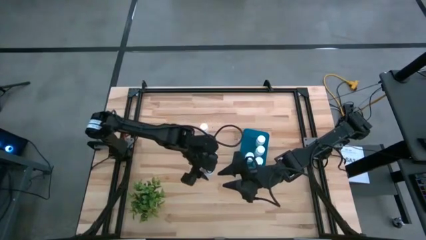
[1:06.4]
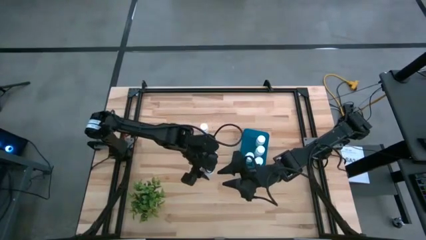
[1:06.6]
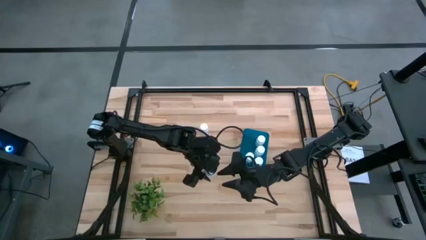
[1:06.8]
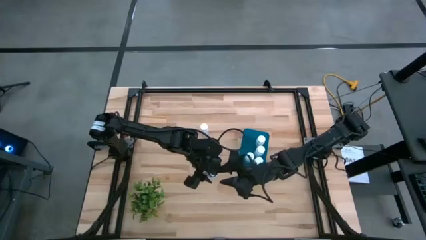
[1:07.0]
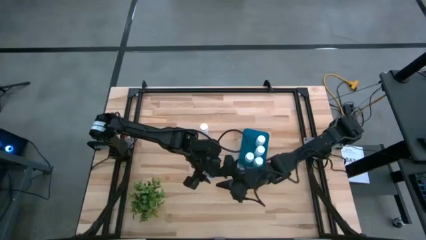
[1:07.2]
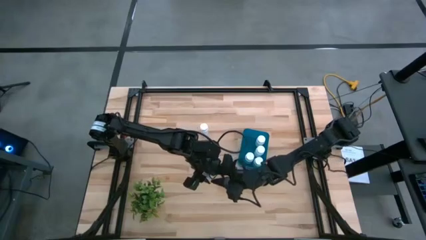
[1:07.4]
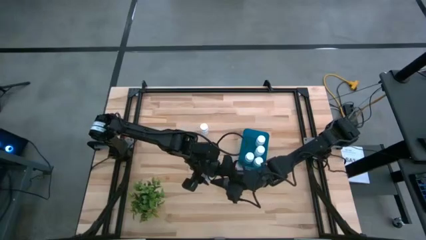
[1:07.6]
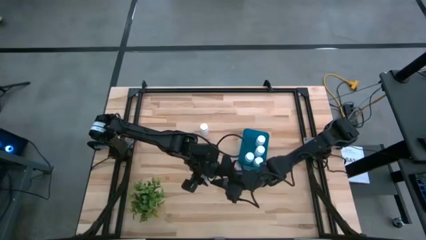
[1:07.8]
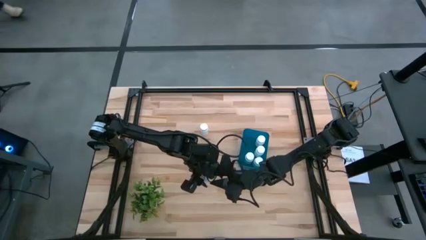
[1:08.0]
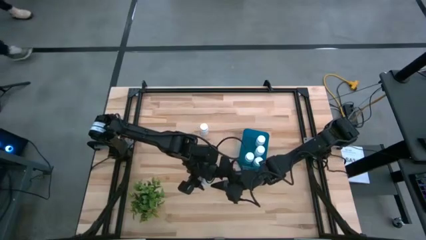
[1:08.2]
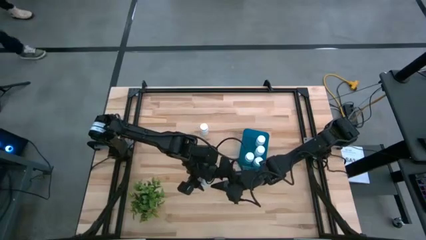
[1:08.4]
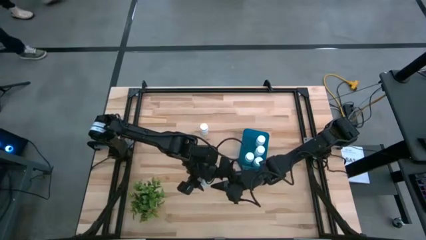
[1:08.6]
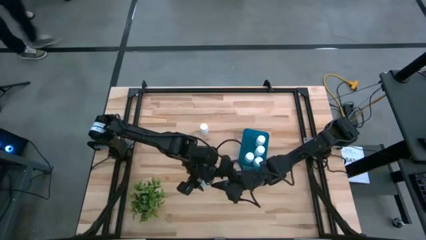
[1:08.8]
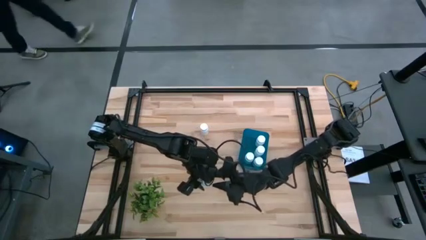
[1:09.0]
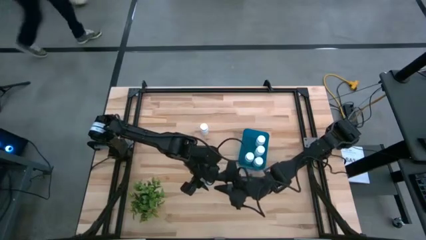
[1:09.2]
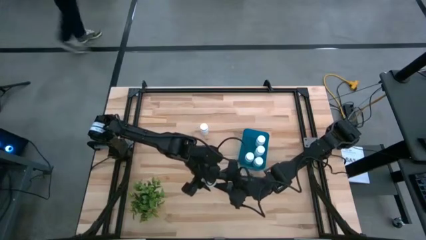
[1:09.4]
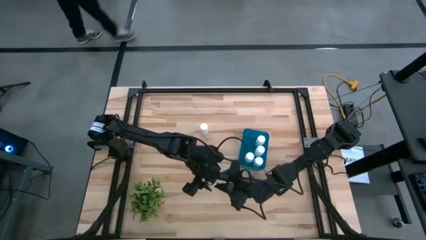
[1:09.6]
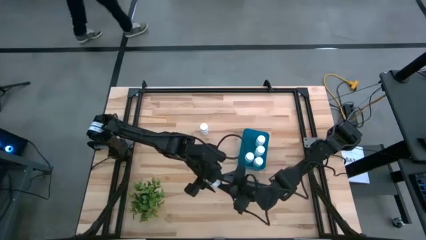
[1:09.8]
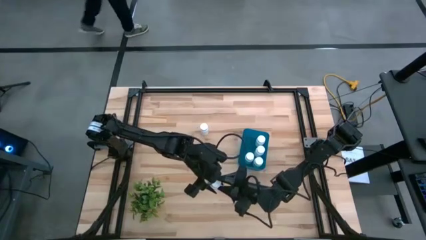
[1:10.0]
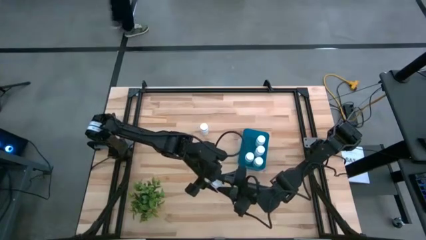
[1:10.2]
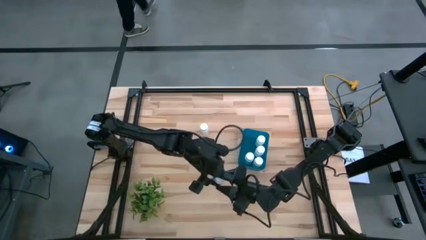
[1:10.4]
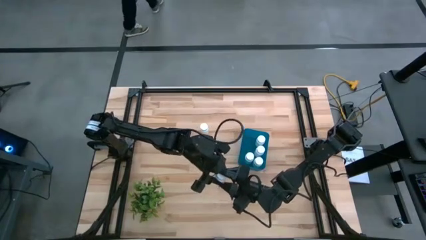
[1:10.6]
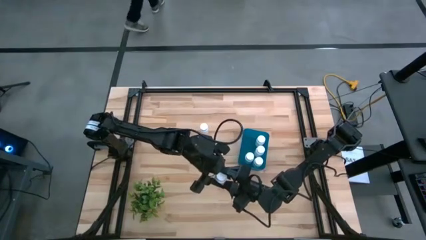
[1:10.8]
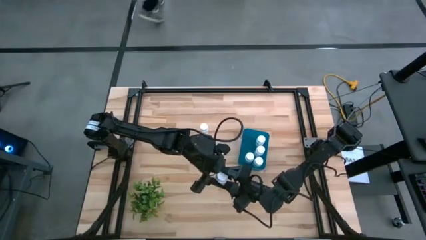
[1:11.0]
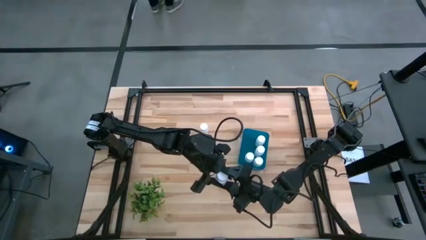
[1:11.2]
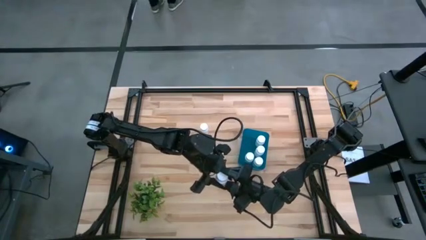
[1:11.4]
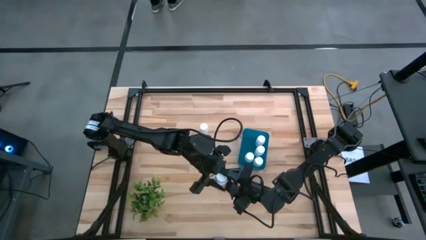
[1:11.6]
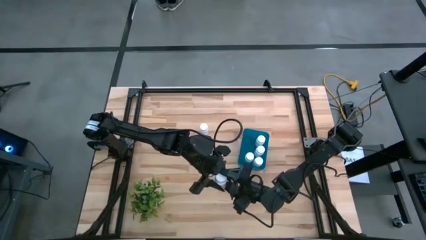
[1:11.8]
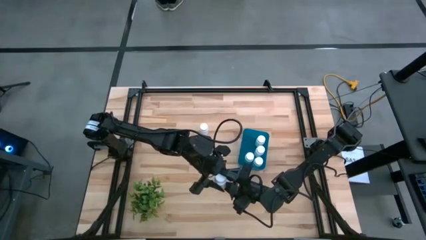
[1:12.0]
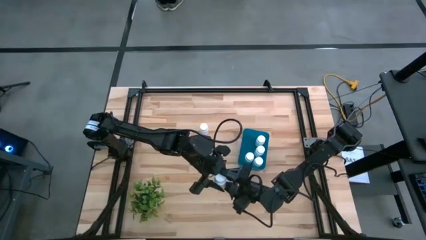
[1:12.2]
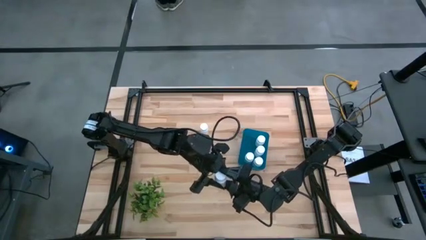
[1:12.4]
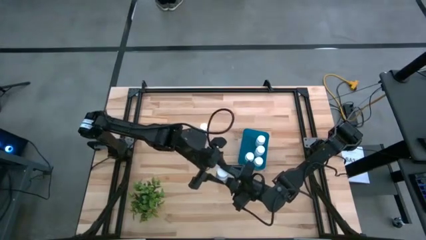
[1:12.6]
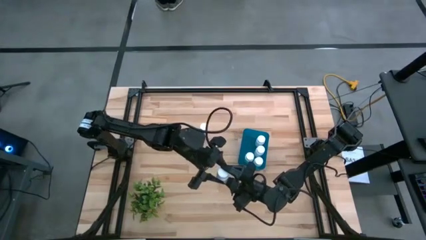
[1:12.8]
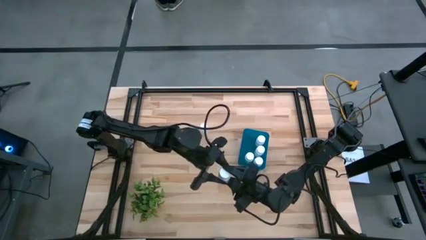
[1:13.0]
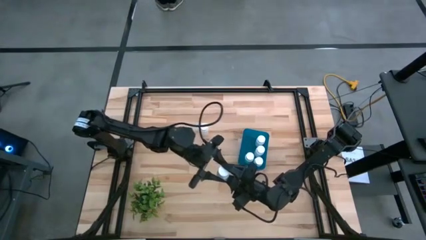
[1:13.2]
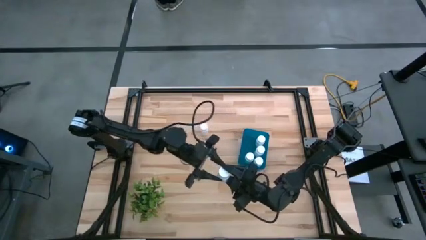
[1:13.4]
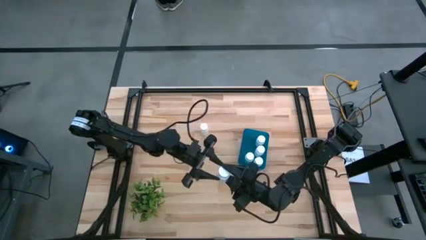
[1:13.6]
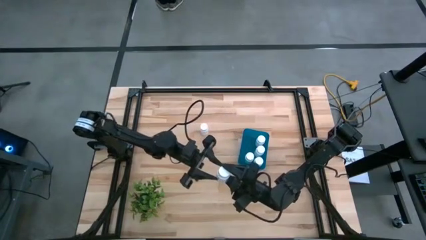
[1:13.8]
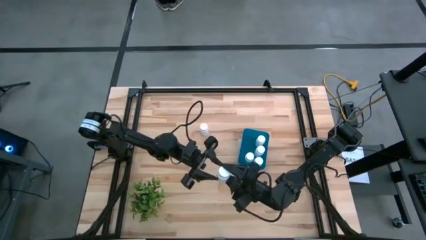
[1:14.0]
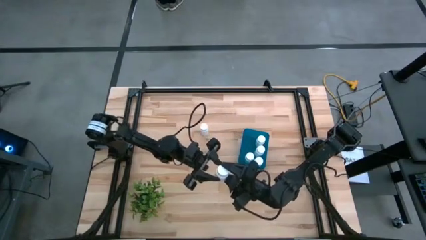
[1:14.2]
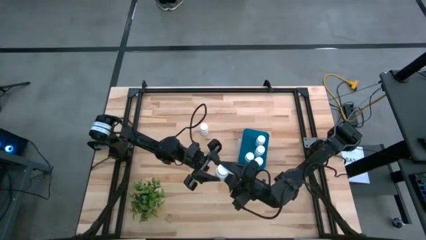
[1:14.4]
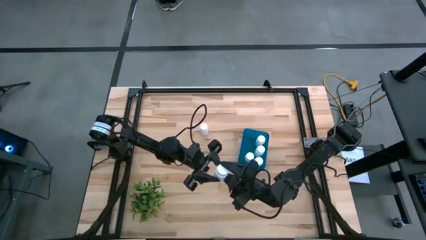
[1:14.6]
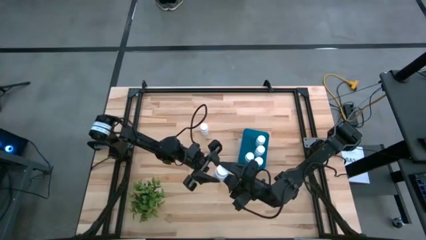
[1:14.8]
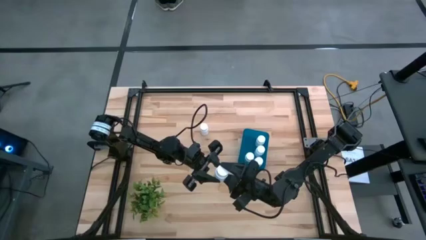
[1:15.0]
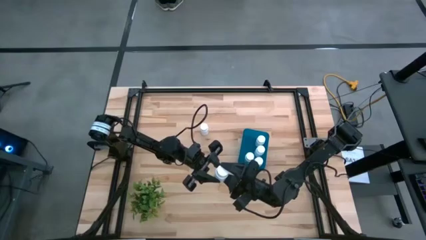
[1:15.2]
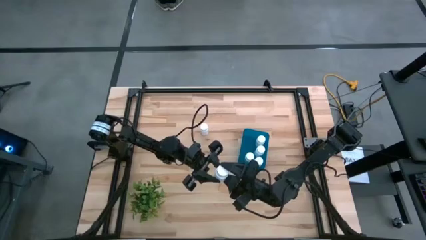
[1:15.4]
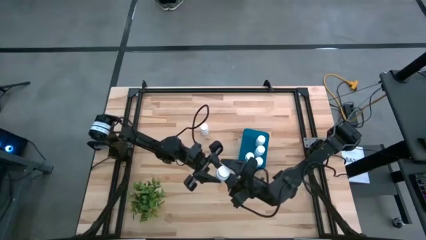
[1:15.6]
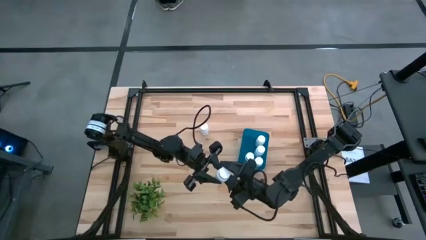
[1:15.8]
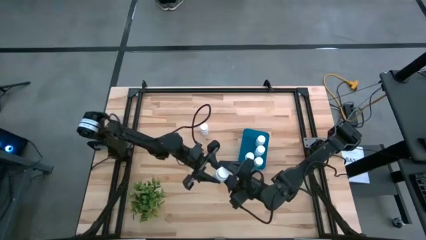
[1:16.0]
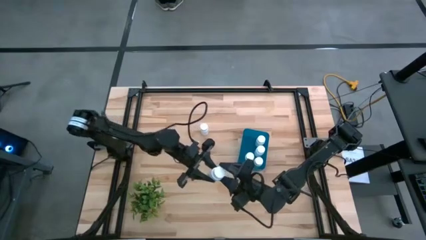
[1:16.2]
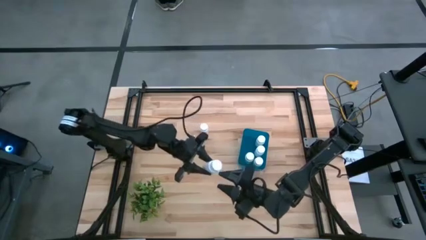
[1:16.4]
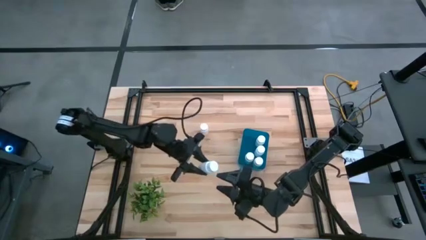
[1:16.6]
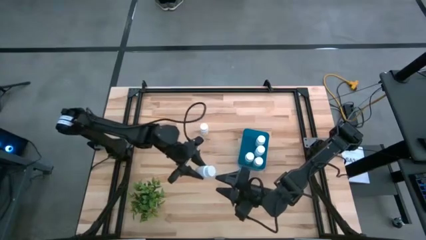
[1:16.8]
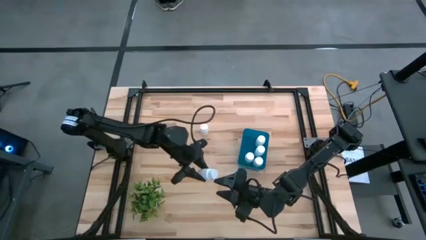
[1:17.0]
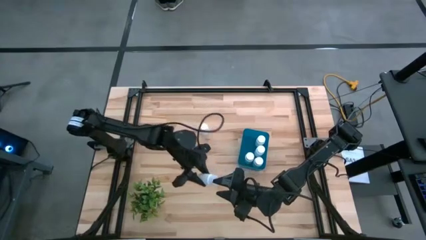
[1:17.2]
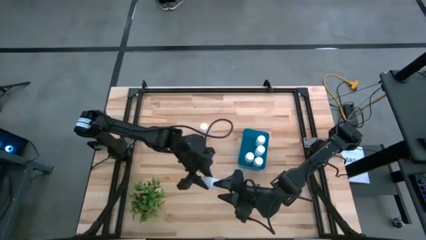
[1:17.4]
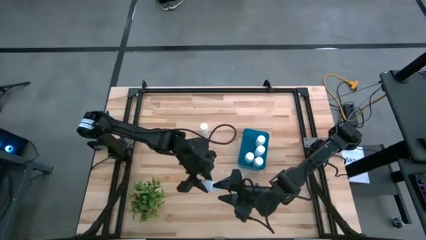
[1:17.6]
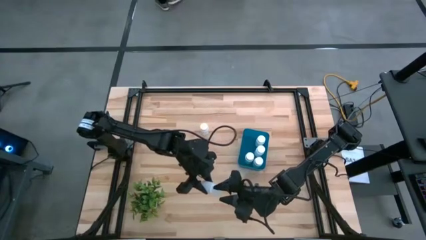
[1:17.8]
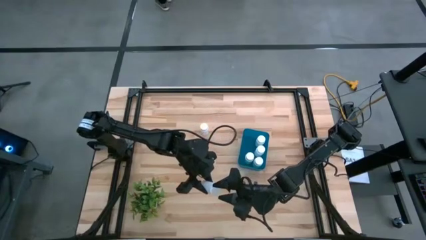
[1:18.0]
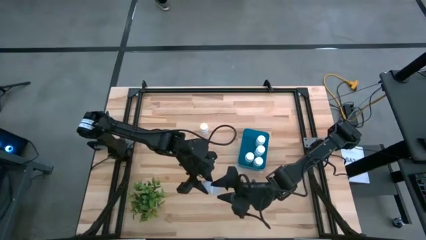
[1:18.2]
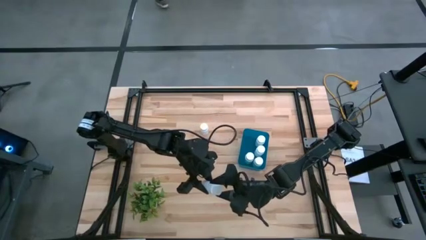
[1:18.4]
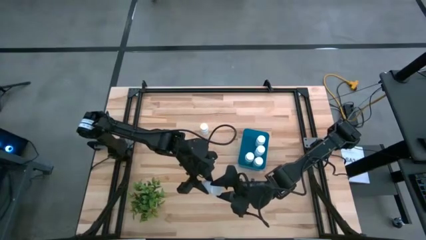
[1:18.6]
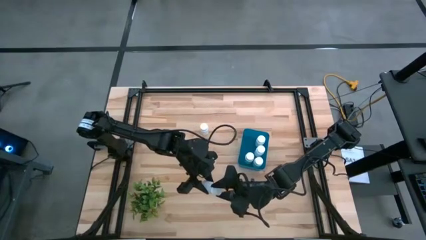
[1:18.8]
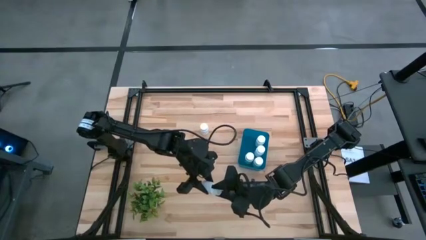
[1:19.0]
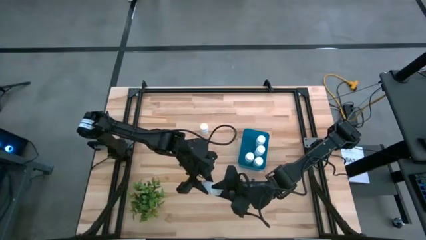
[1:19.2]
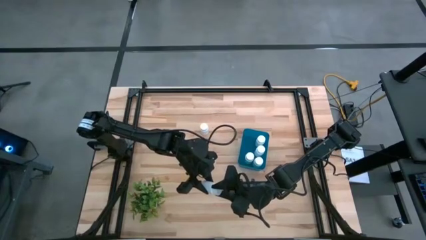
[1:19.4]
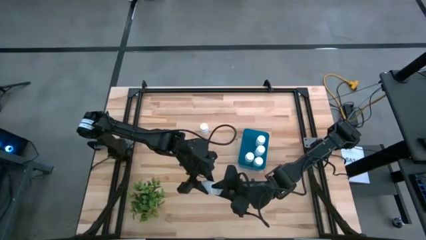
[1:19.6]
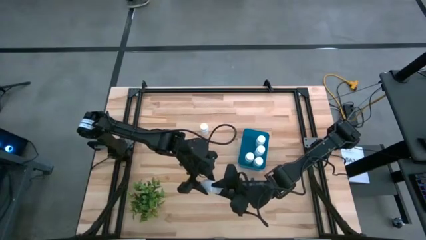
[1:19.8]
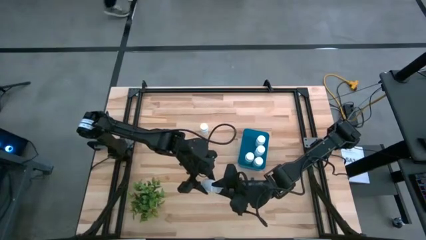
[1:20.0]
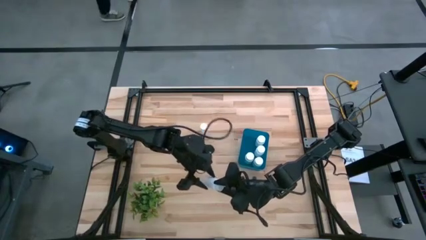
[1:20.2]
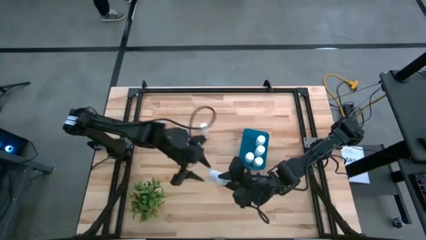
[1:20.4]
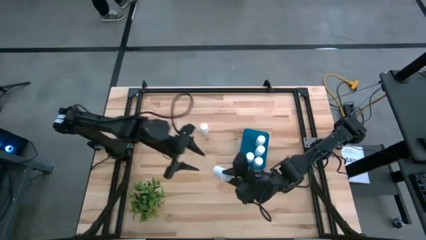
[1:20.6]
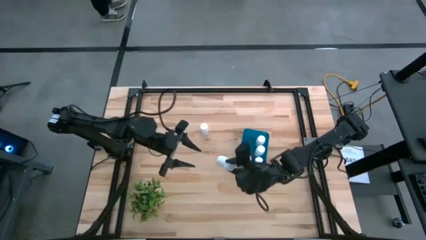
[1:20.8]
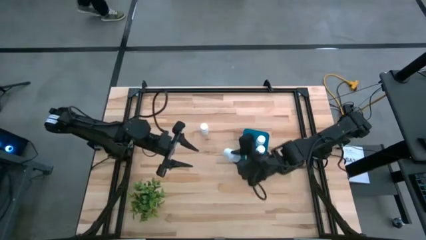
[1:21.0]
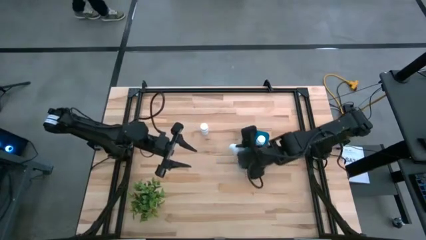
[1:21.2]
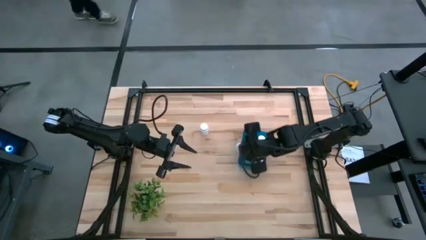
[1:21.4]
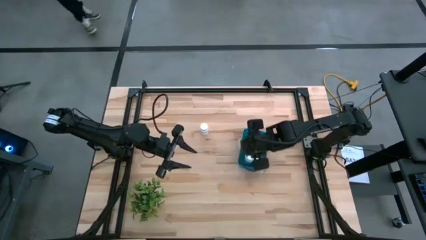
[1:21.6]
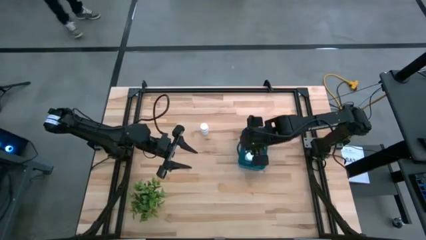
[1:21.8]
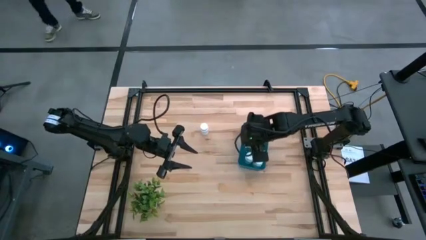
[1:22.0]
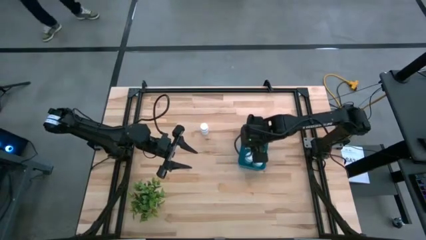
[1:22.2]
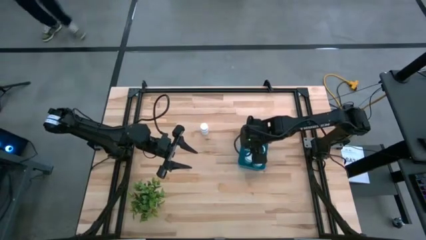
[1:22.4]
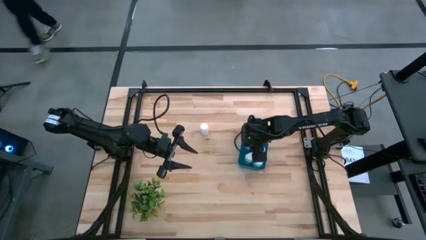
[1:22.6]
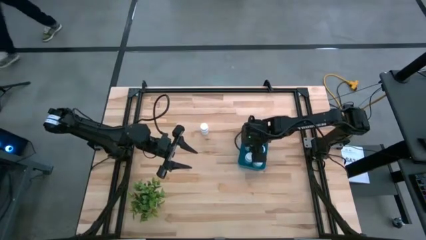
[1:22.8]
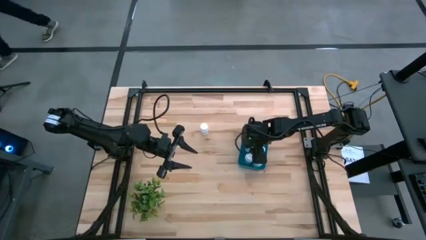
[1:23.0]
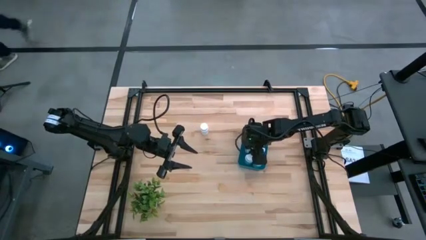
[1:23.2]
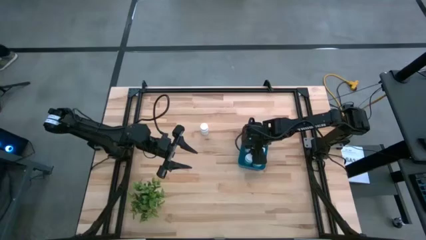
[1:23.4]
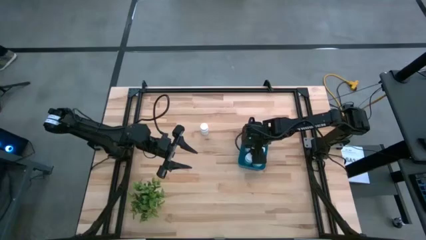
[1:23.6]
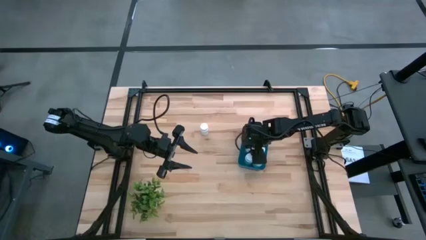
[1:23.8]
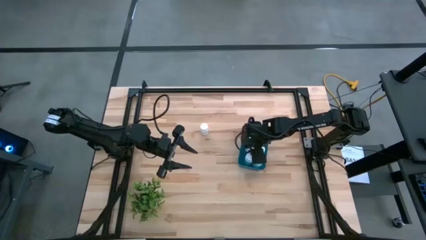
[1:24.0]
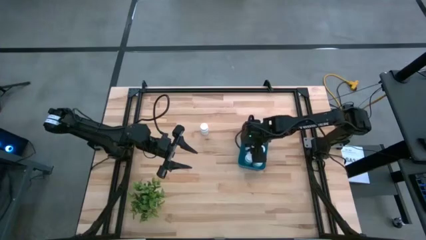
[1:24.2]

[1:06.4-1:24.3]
Task: Pick and place pill bottles into a basket
Put the white medicine bottle into the blue bin
